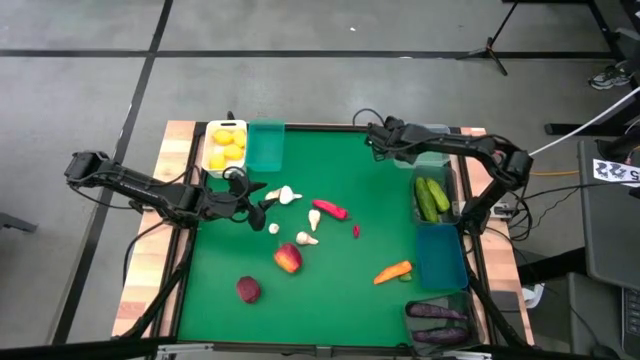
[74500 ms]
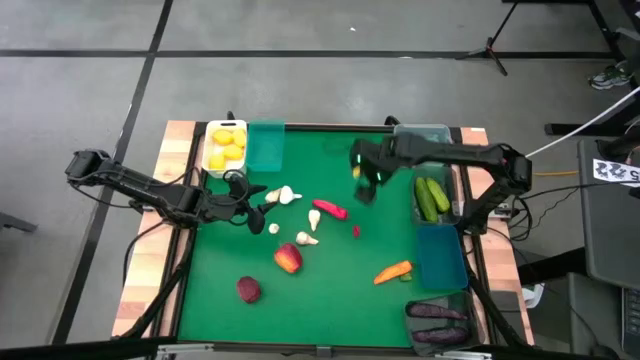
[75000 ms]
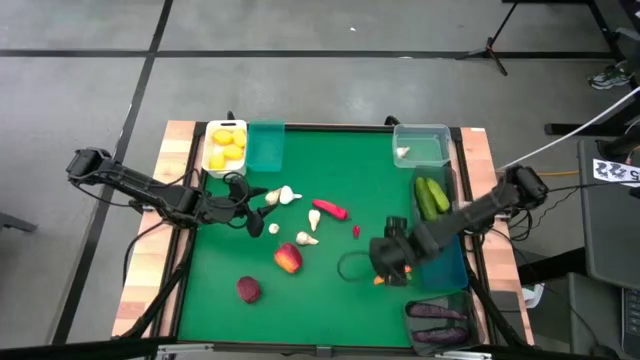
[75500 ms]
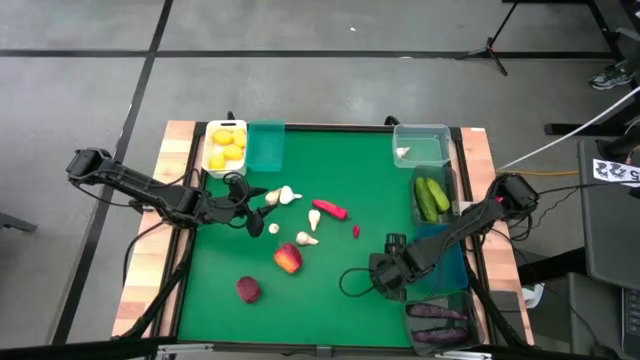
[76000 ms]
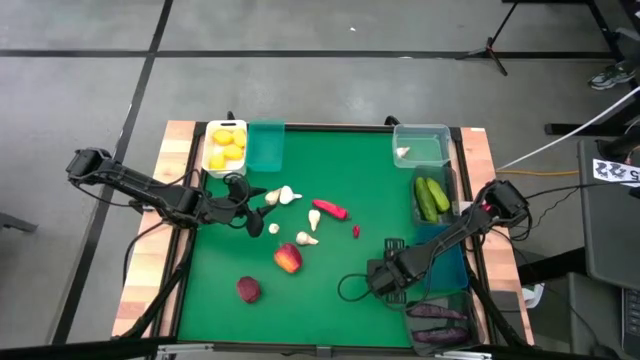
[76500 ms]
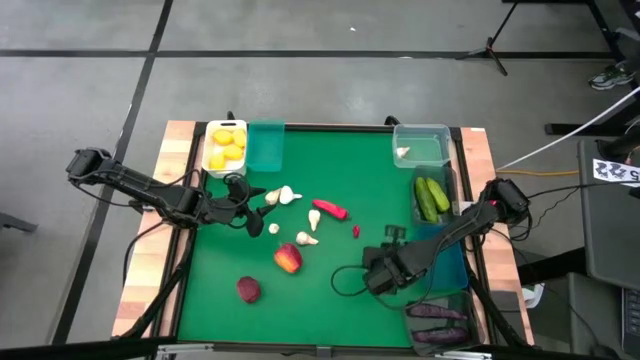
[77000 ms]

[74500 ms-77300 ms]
Task: Sort produce into baskets
Put the orange chili pepper into the blue bin

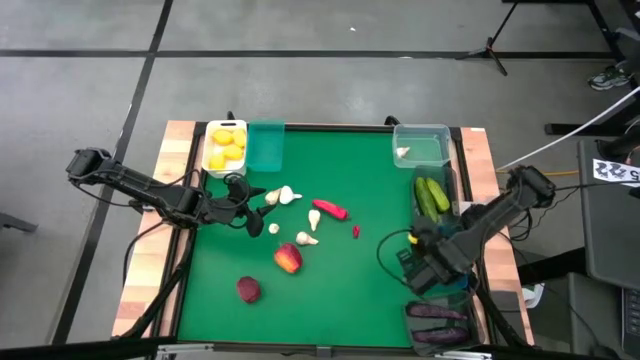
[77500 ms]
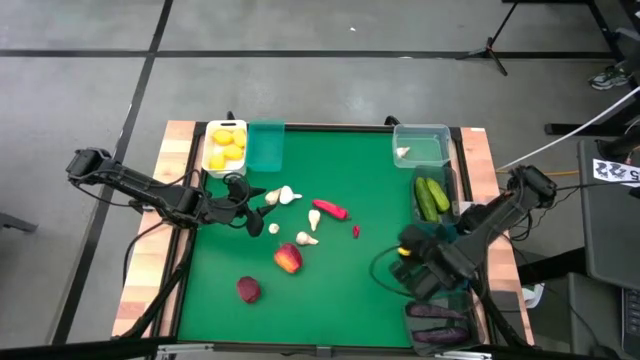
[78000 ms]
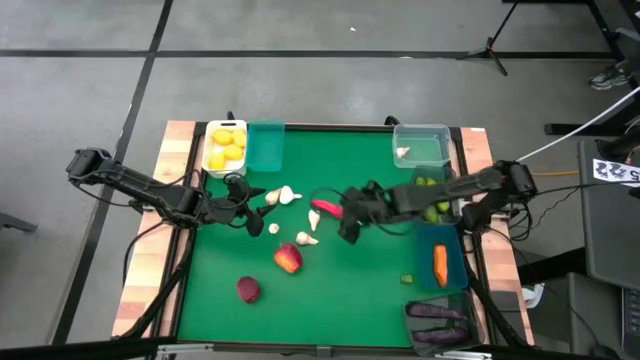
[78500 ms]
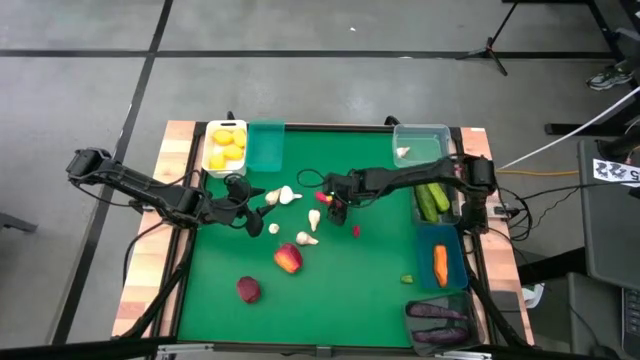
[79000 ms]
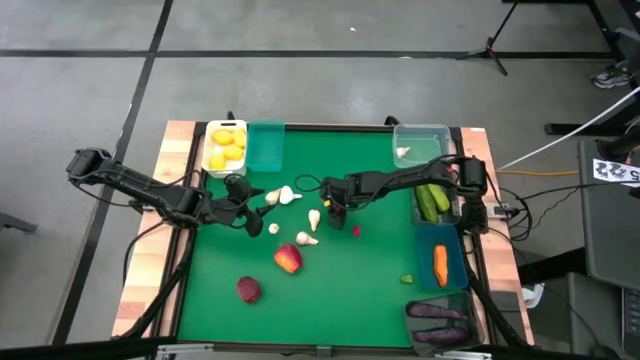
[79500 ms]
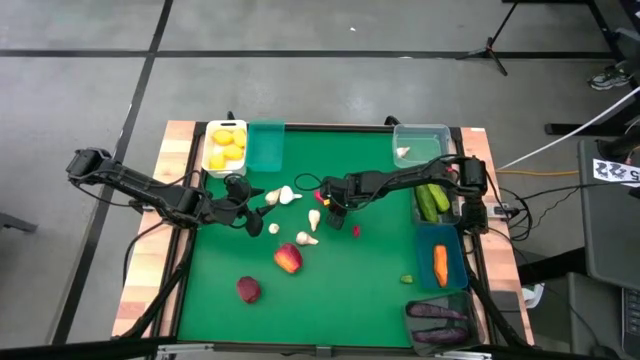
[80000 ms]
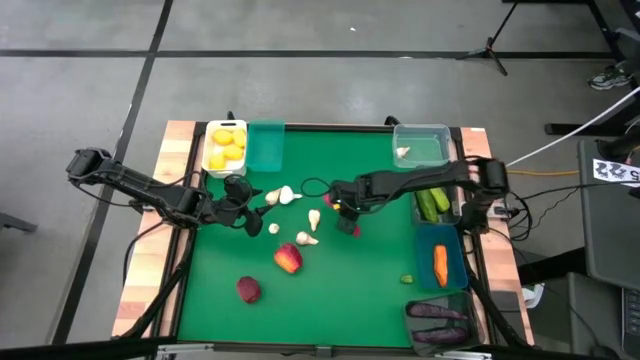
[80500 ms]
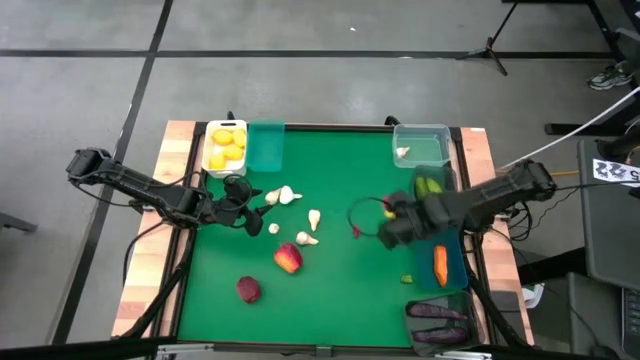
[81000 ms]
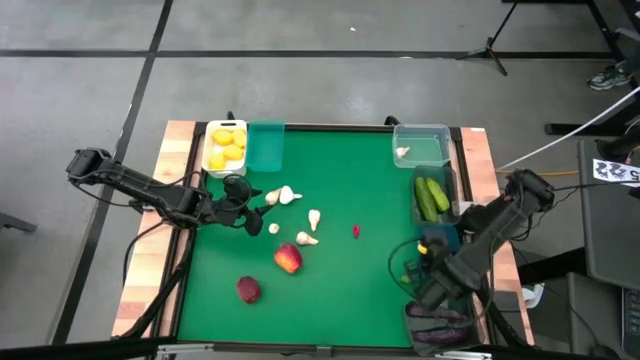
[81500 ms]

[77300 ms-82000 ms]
Put the red chili pepper into the blue bin

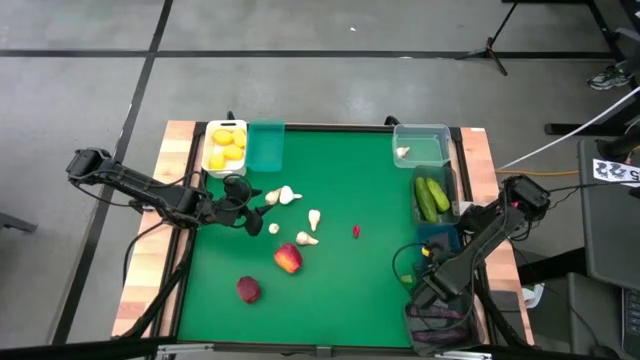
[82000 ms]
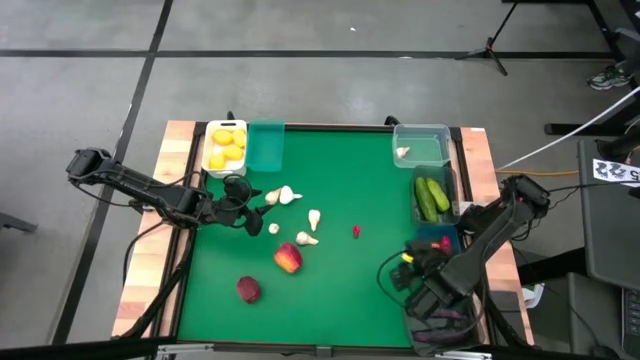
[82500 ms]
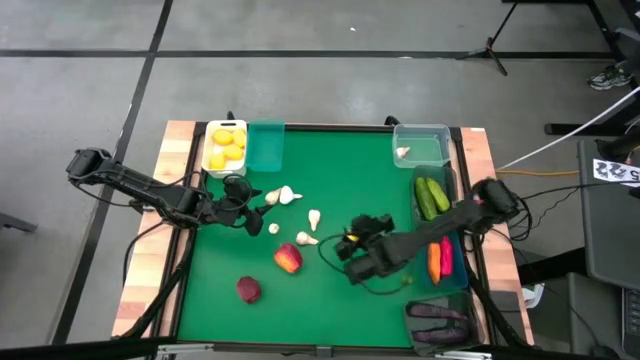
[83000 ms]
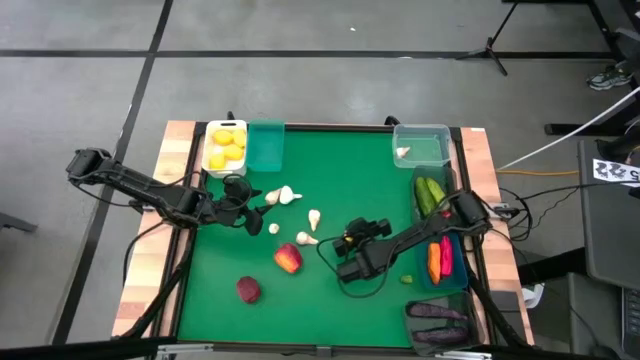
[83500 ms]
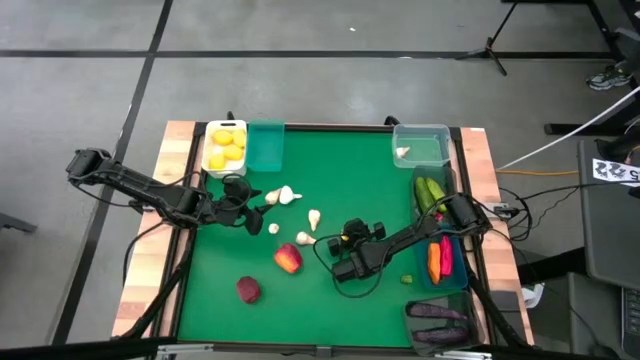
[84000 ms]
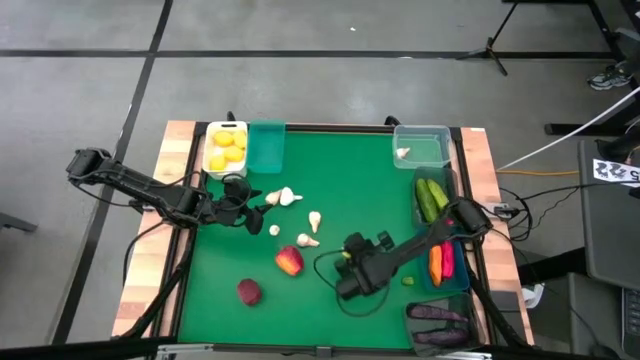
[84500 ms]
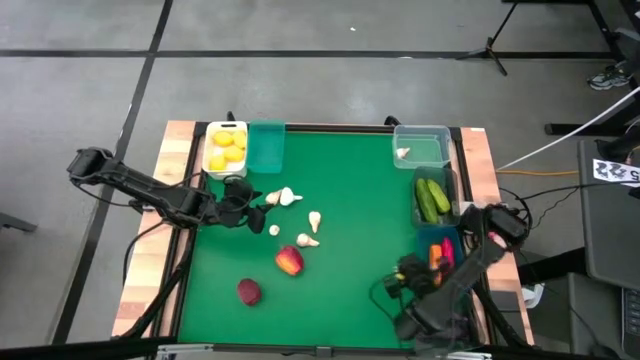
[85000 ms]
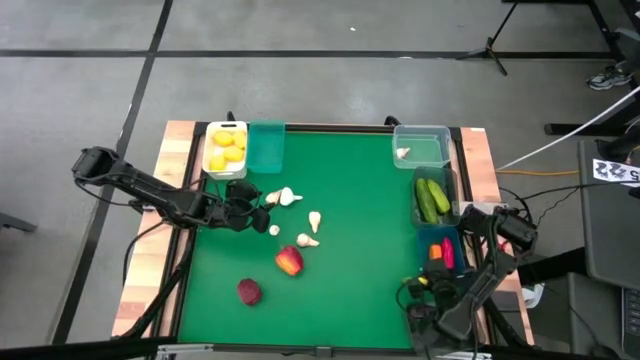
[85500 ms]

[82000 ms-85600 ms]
Put the red chili pepper into the blue bin

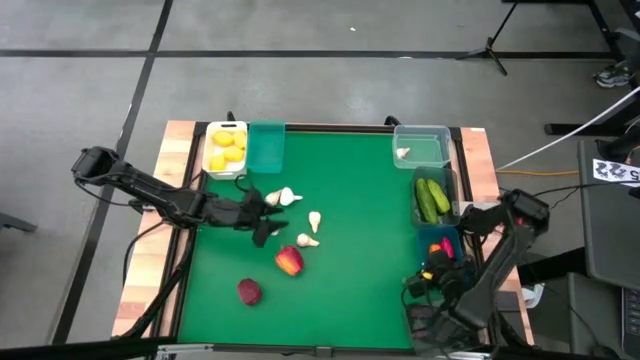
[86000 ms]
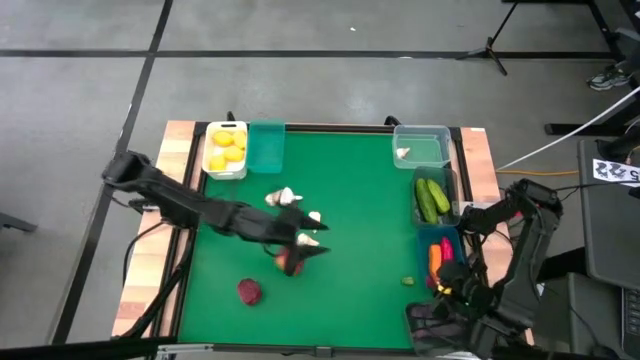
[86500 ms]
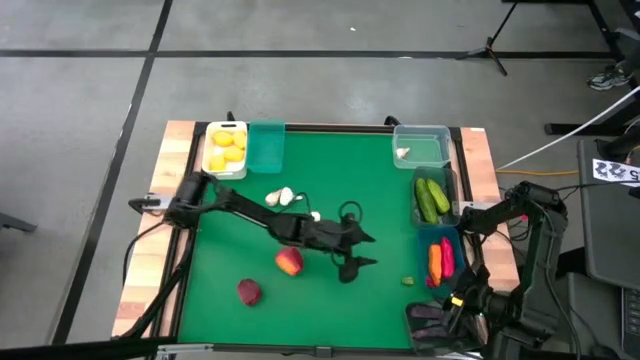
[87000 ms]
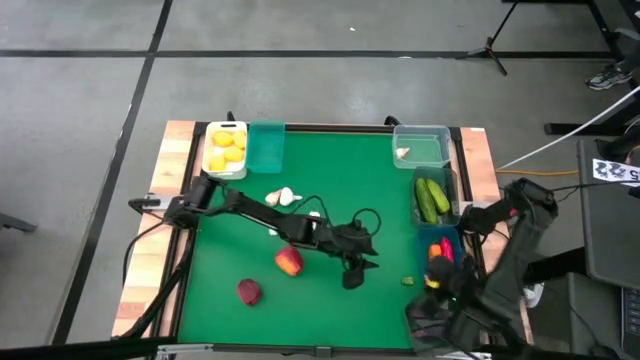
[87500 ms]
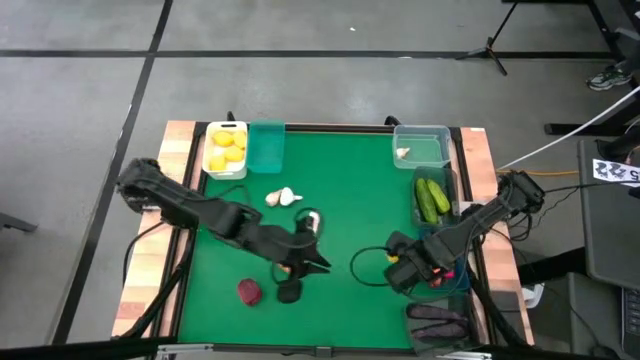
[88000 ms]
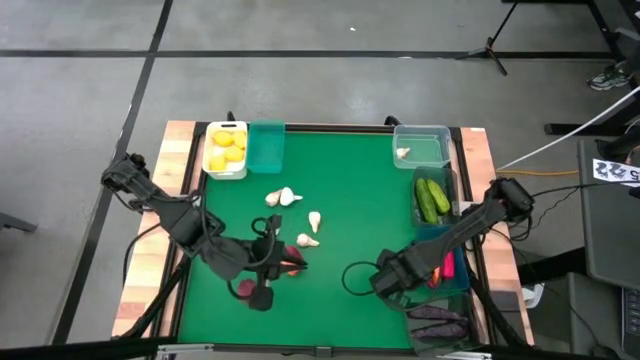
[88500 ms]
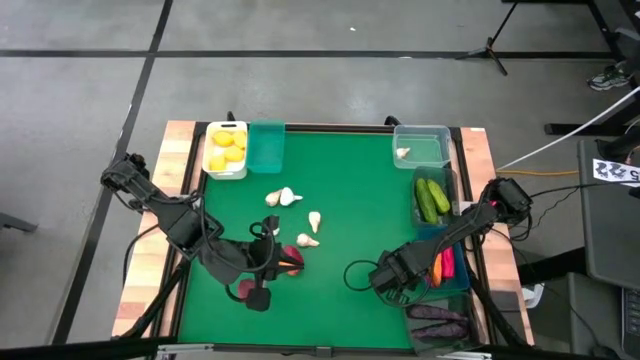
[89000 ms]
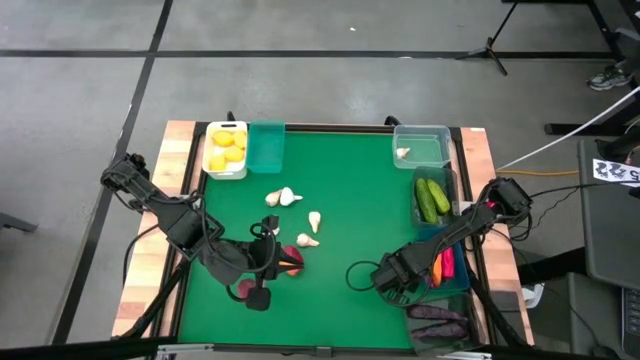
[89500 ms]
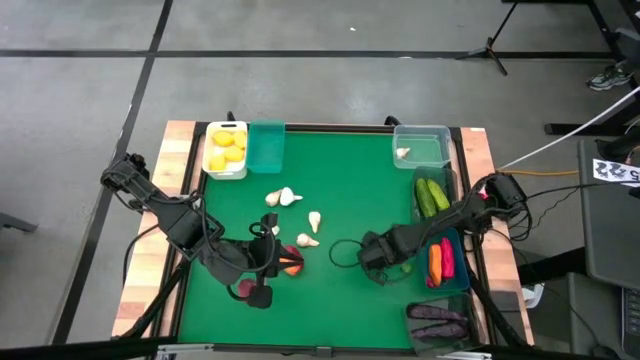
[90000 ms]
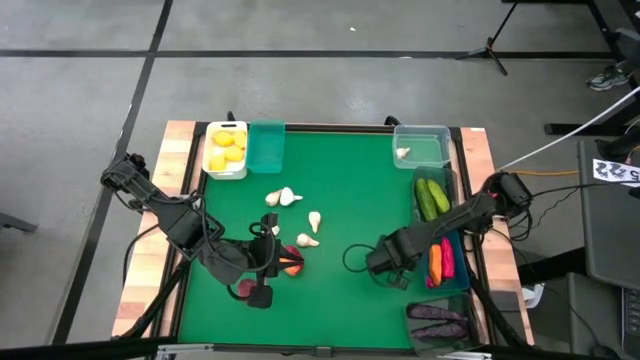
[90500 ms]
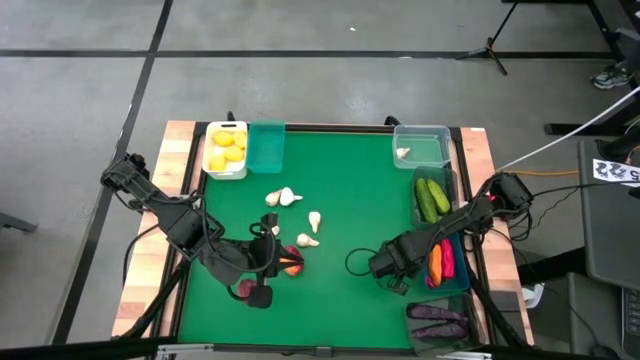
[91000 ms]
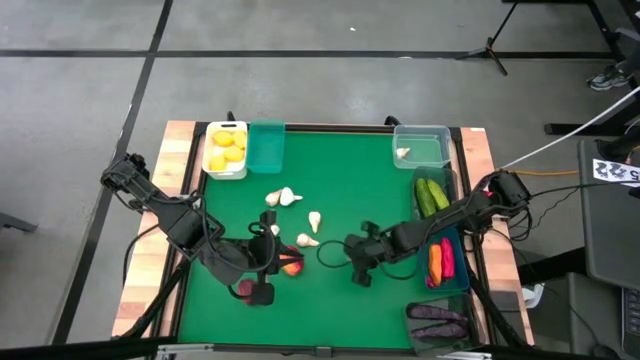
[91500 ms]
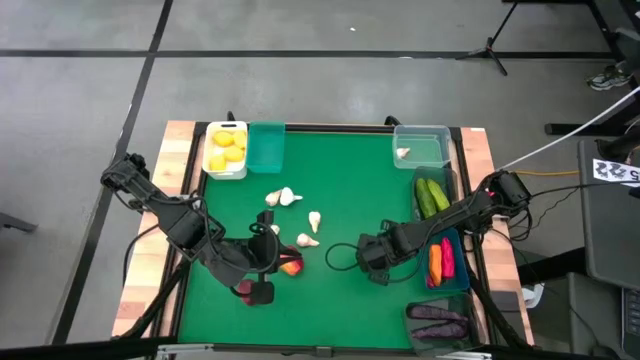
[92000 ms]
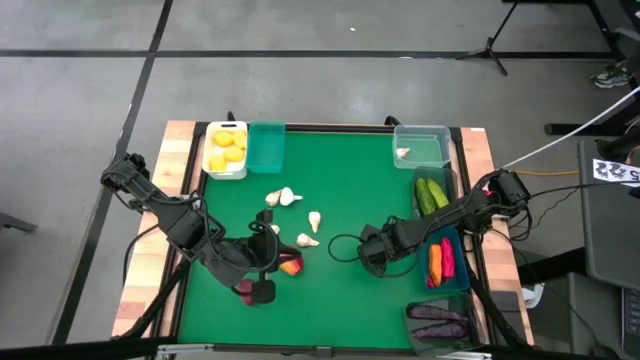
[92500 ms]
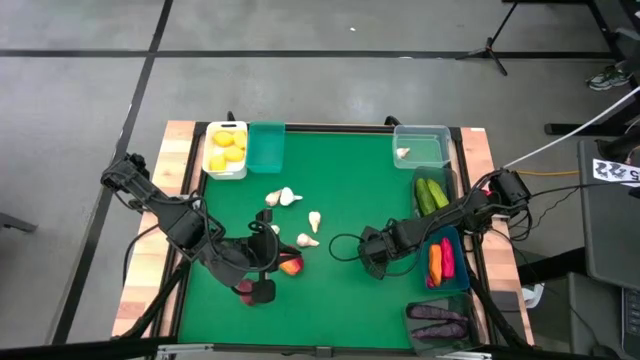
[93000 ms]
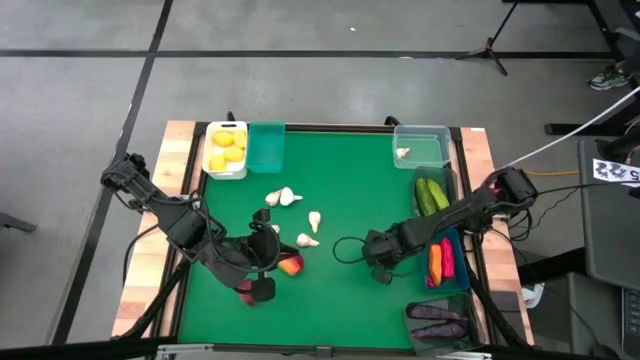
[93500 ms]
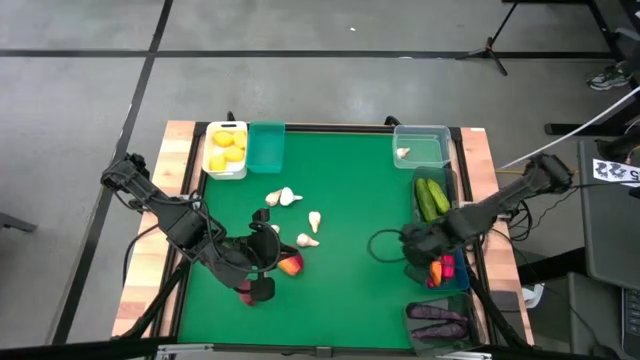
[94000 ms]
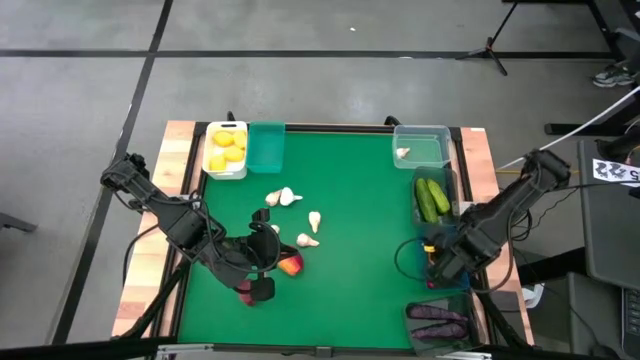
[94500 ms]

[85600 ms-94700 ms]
Put the green chili pepper into the blue bin
